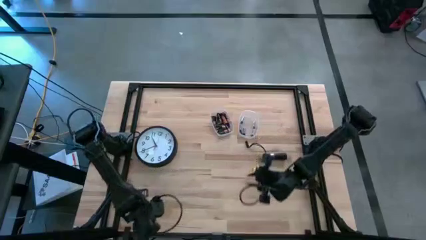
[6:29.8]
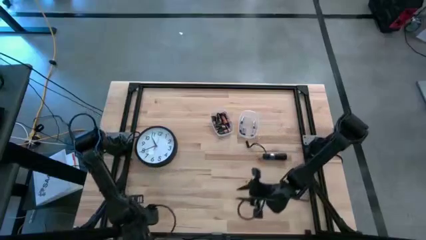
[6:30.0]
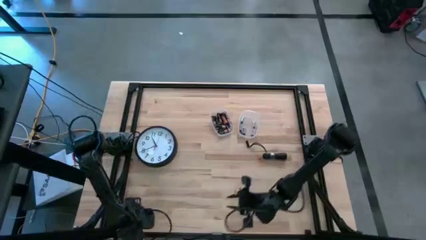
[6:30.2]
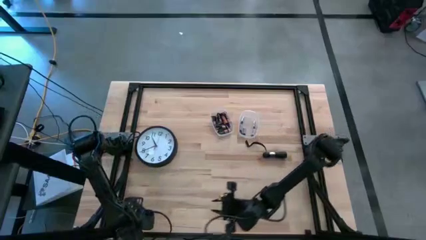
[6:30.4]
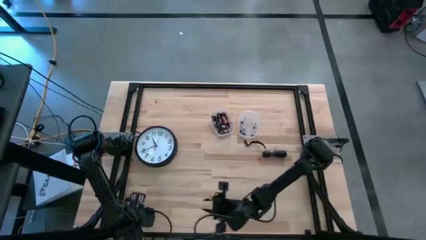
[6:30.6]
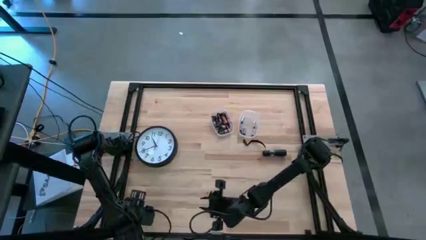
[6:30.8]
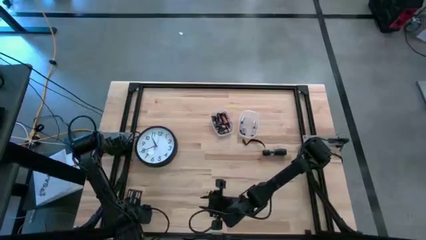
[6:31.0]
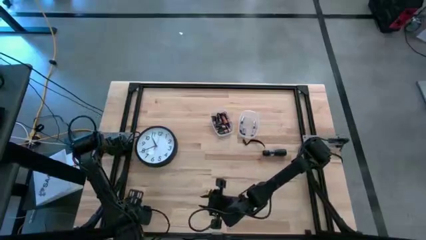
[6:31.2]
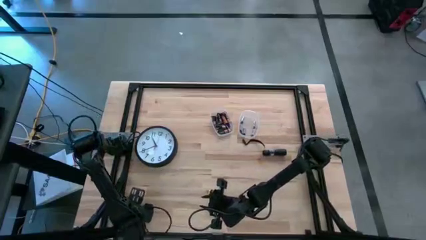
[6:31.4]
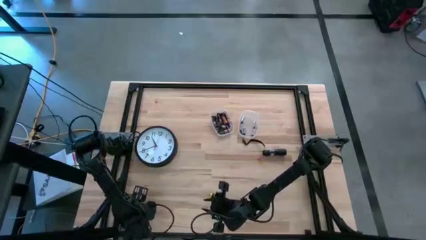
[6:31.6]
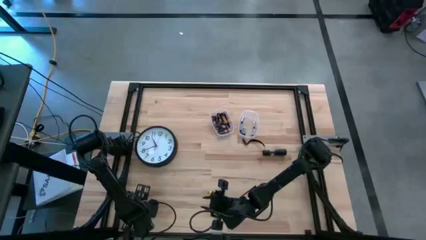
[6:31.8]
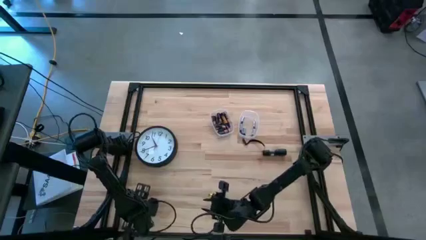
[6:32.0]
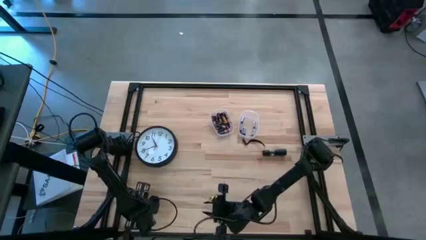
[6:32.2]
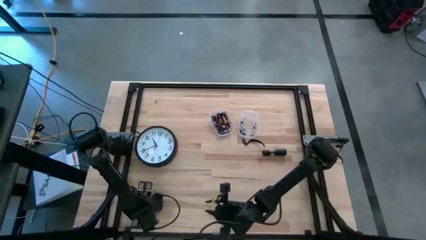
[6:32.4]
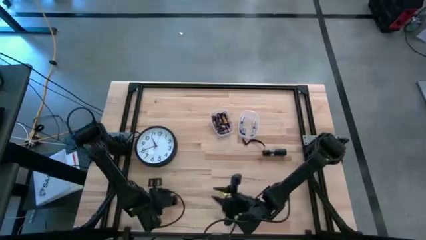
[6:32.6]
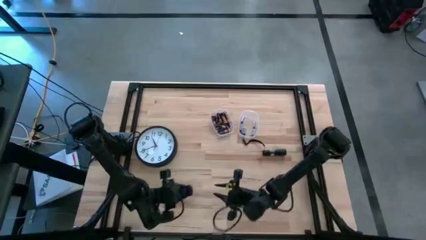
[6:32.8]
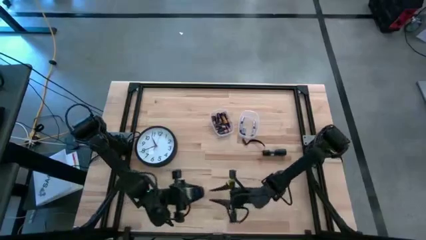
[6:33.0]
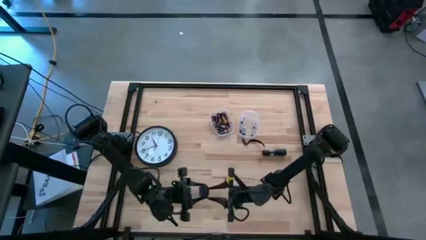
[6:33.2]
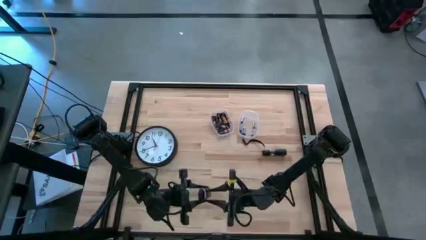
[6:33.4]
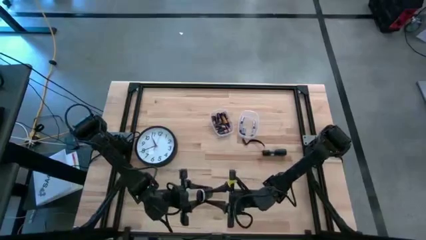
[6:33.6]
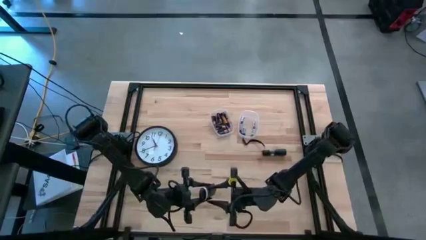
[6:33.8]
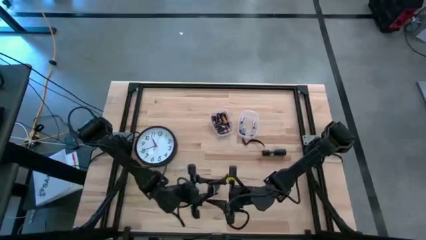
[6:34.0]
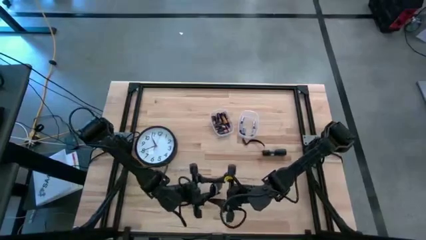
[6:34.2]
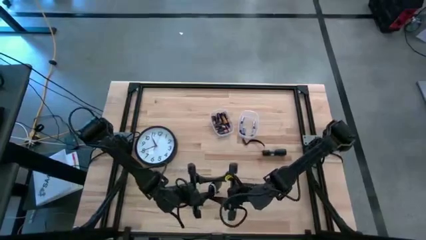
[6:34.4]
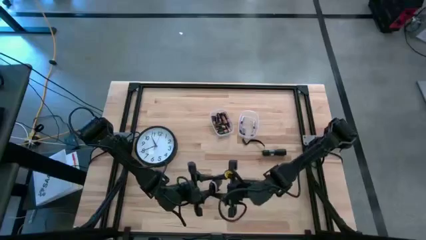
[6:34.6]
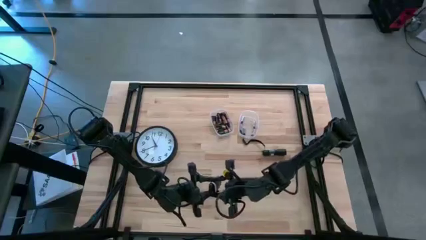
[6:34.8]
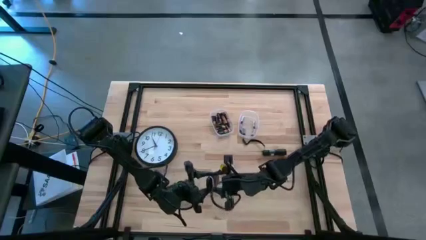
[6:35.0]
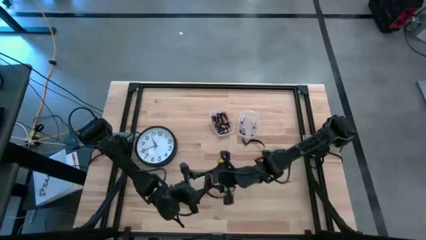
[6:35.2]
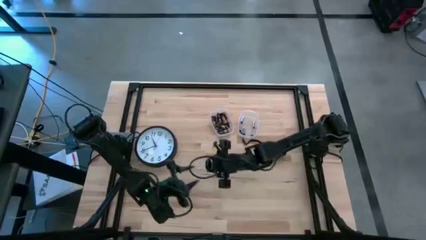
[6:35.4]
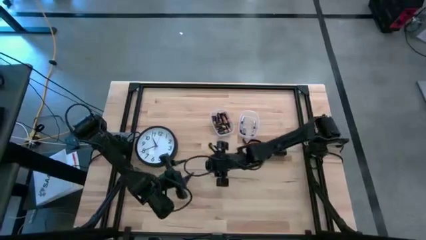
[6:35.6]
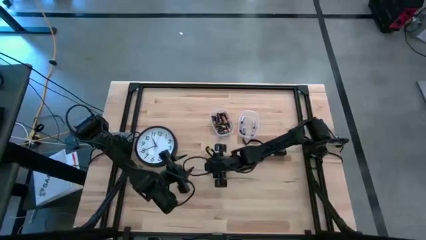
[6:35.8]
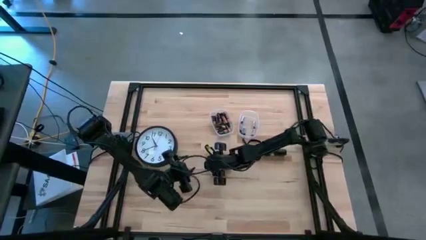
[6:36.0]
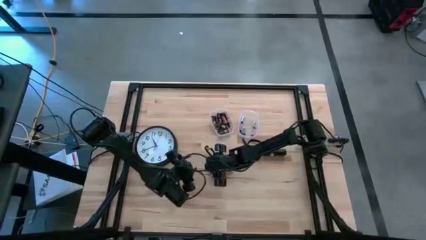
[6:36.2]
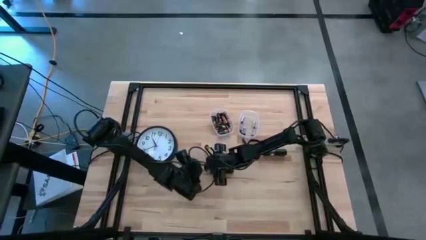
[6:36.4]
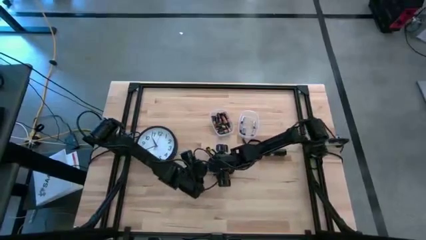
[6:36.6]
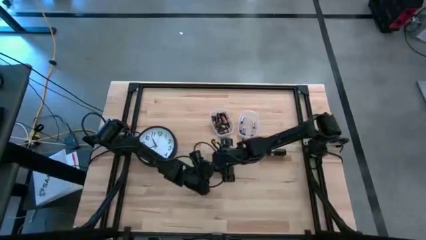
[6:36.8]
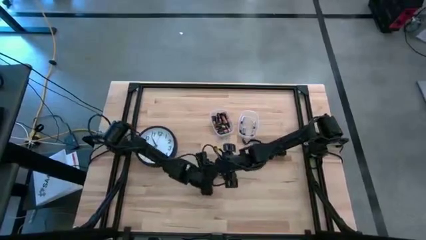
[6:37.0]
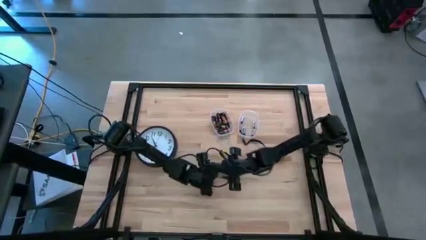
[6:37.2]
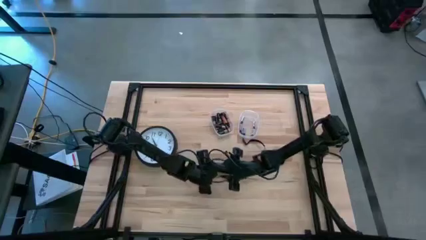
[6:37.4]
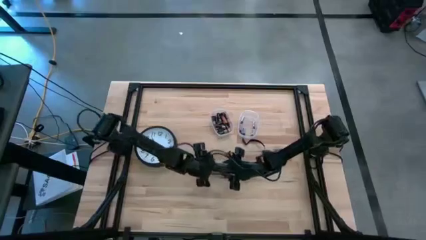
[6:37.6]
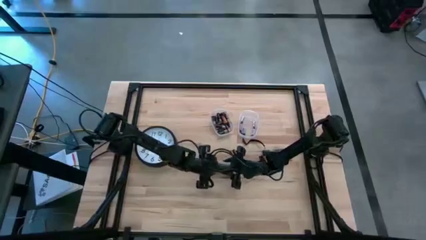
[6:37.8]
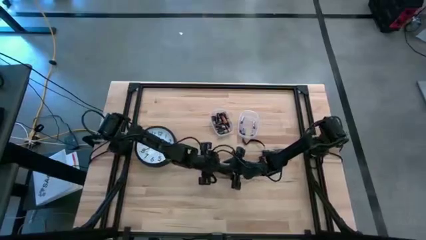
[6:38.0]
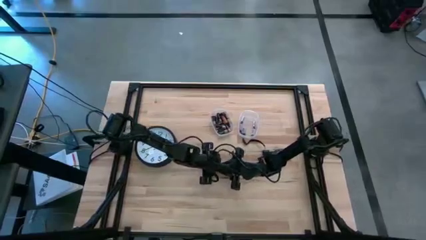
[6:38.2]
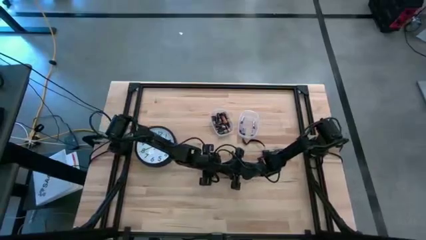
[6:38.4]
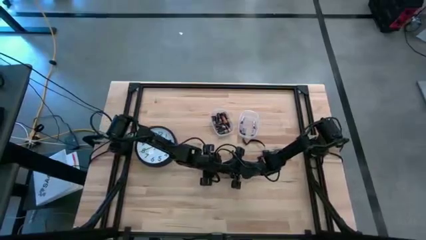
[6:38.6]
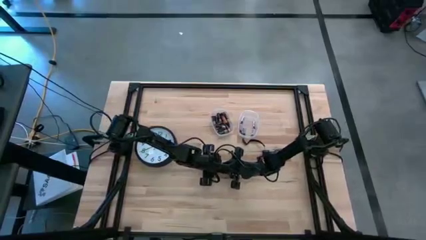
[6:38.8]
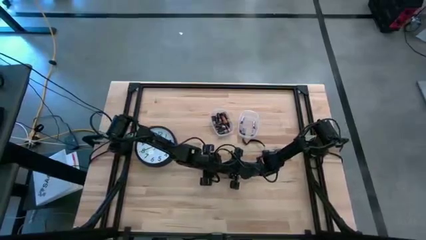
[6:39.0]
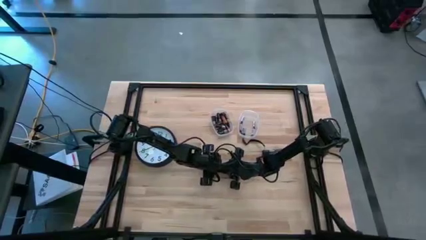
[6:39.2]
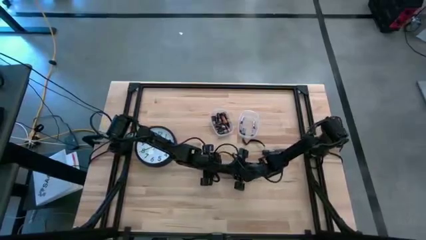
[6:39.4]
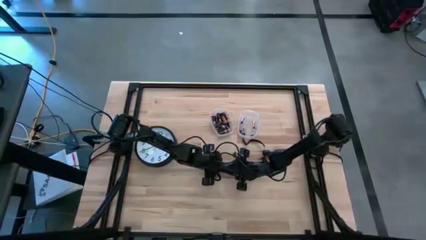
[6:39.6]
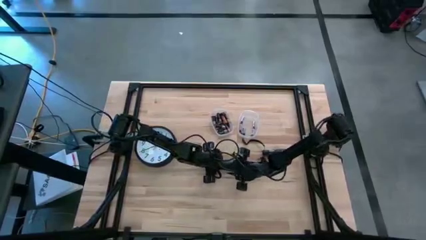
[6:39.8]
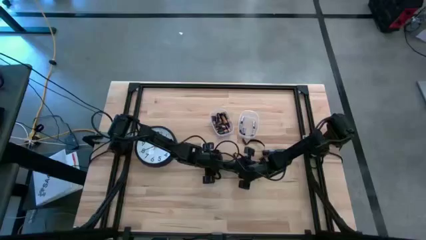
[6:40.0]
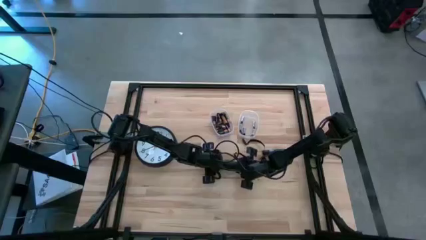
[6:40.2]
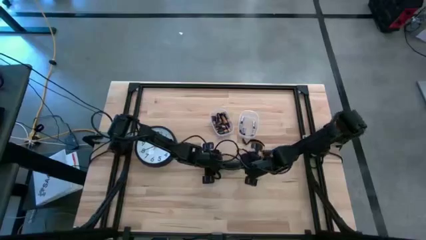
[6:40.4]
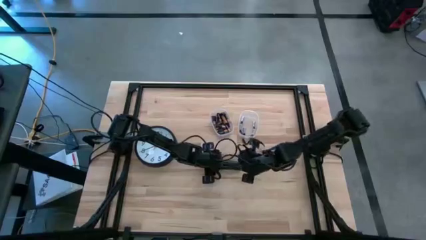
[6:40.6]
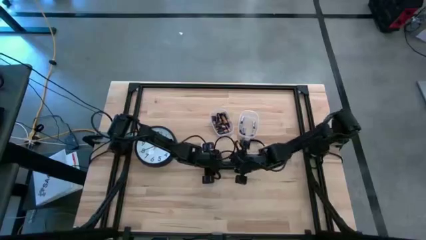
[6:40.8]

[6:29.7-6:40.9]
Task: Insert battery
Open the battery cover of the black remote

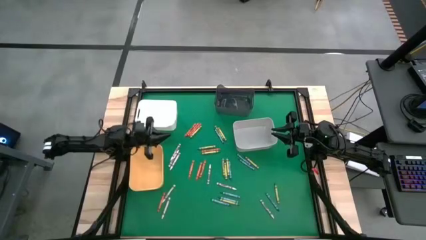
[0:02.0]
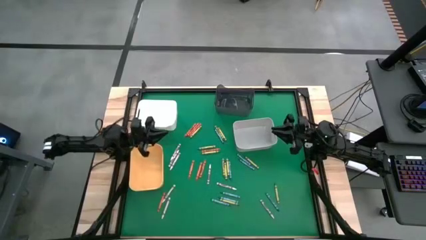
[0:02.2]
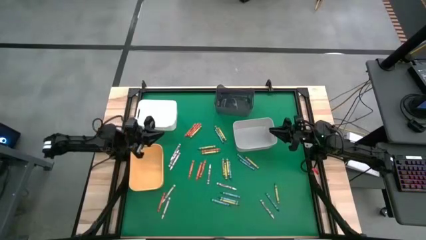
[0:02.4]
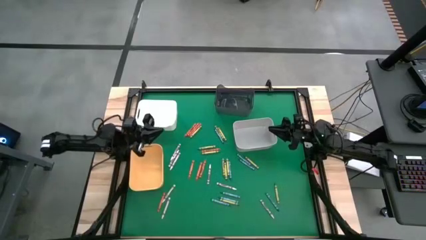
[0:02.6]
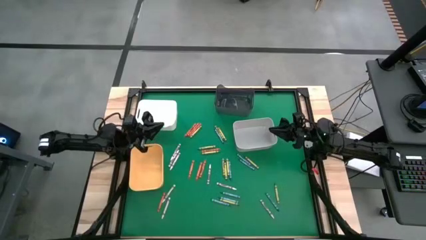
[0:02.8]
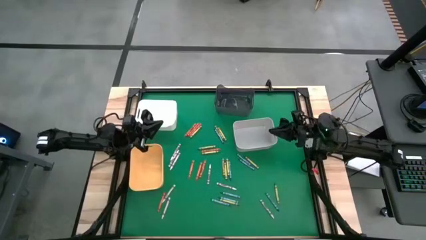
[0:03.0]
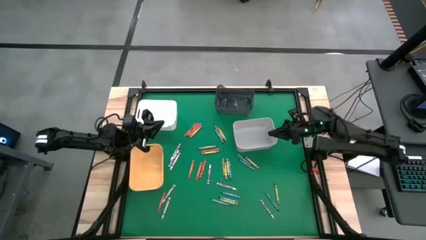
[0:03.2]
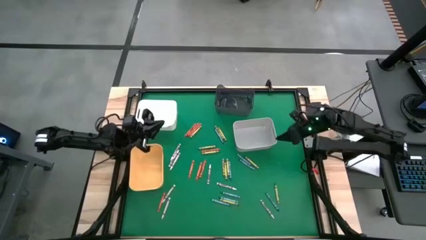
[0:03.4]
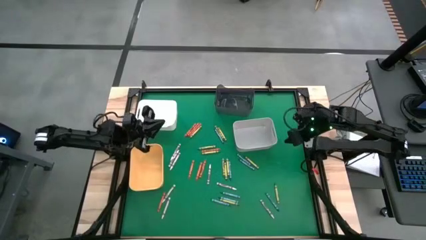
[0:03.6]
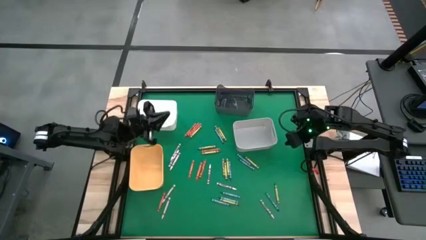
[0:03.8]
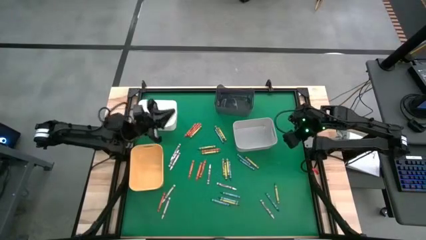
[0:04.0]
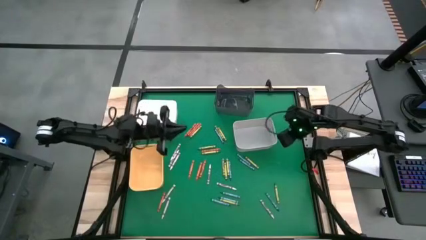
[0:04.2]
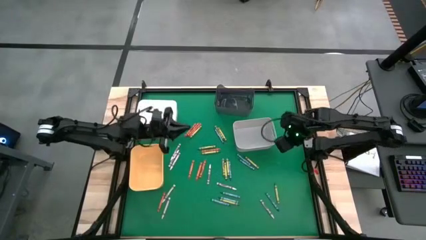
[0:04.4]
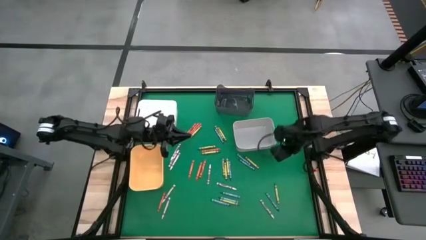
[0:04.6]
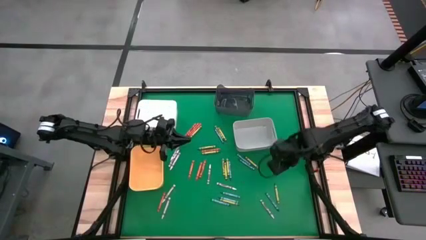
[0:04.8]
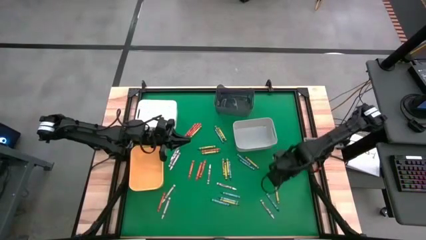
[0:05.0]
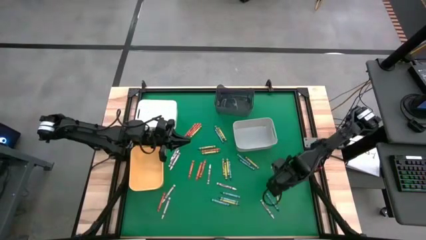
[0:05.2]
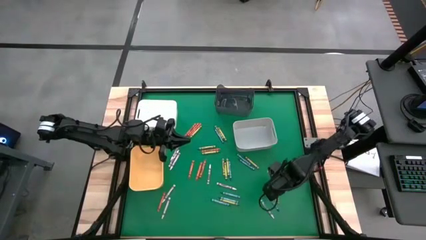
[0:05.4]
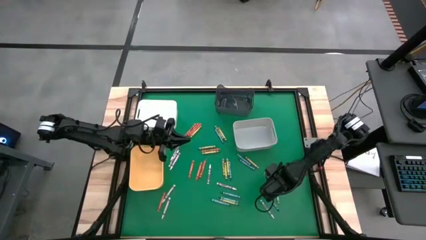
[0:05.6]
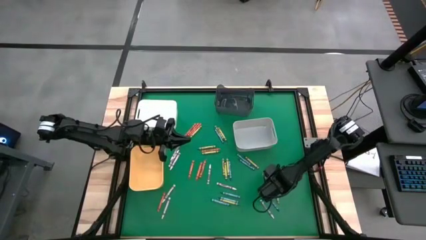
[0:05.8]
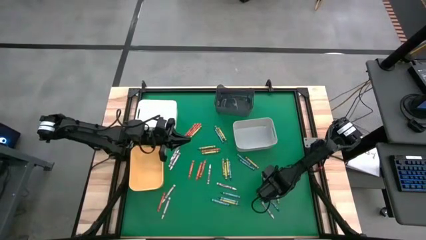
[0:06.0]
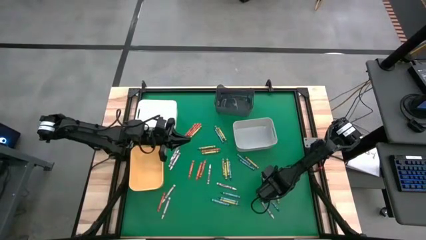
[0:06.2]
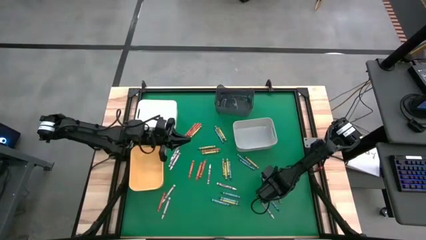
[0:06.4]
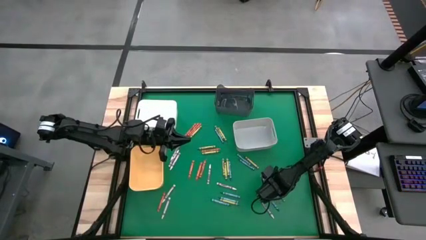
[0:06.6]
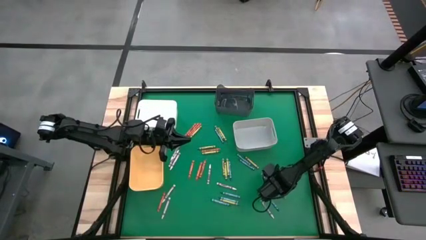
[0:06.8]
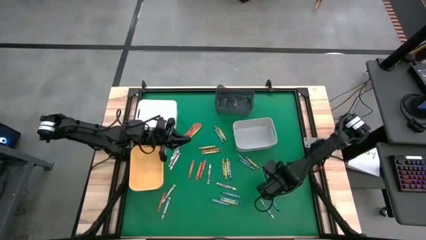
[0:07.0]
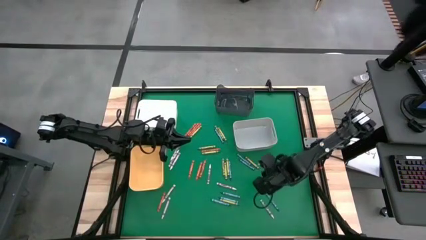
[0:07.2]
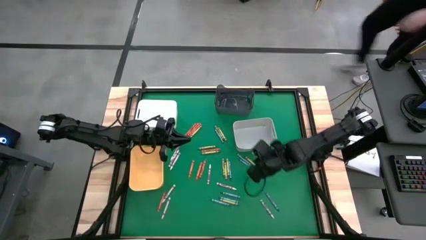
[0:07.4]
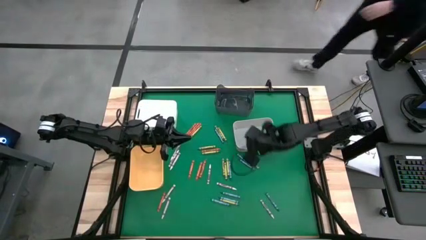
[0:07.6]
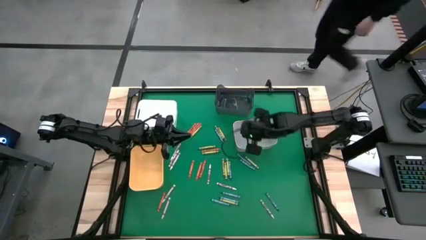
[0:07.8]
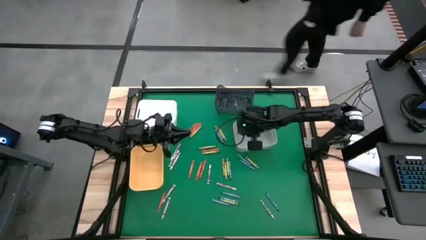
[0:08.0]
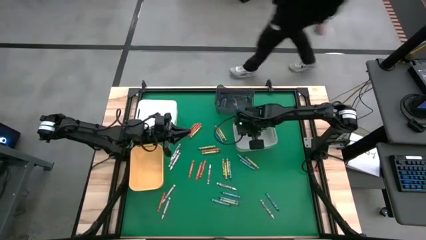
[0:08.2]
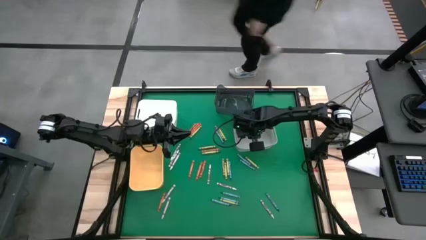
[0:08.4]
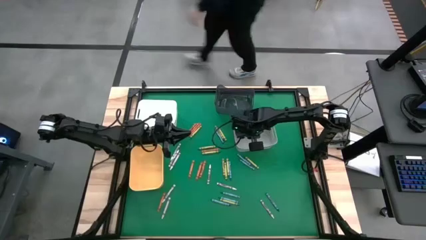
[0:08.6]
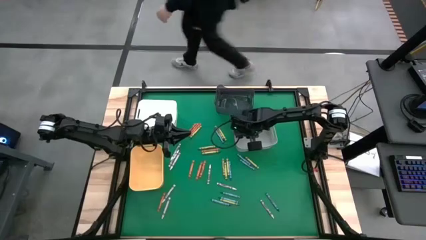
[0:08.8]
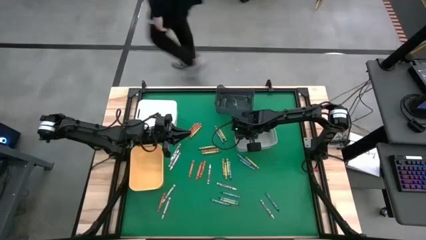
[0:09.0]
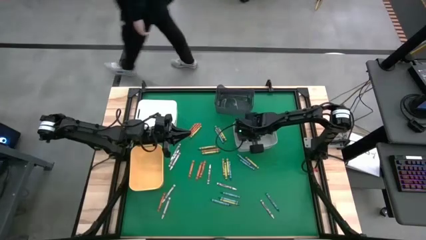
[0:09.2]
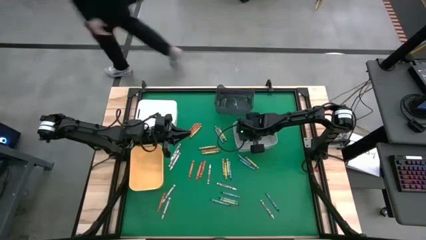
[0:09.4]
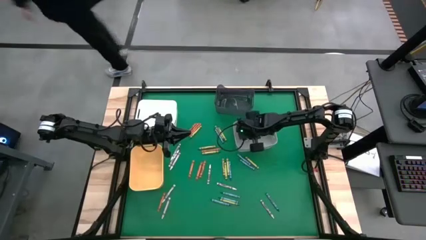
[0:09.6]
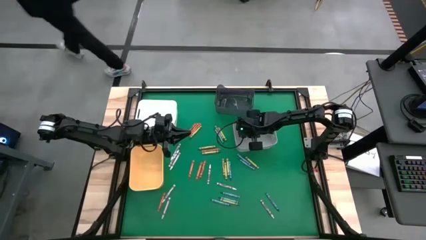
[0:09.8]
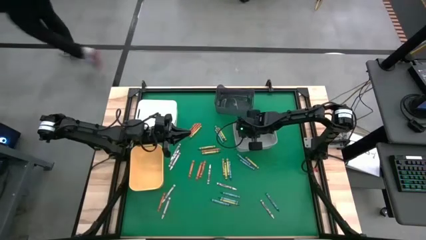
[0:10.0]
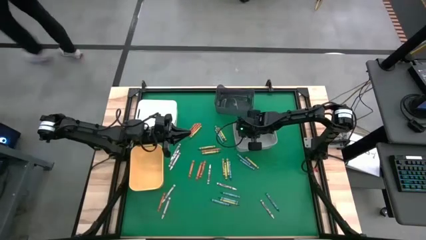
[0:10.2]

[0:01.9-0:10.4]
Task: Sort crayons
Put the green crayon into the gray bin
